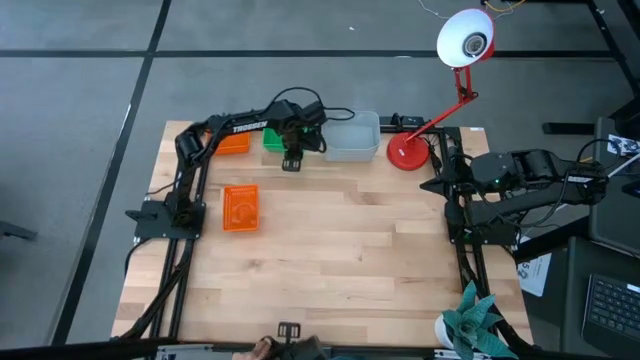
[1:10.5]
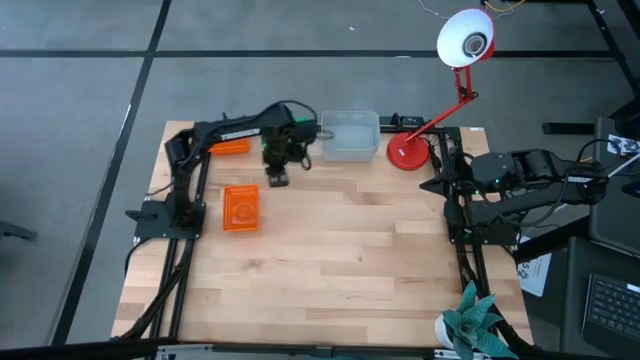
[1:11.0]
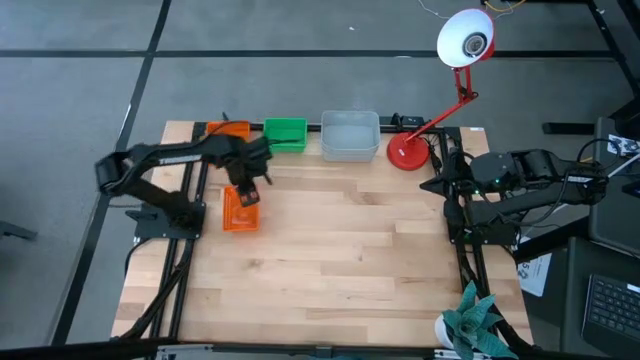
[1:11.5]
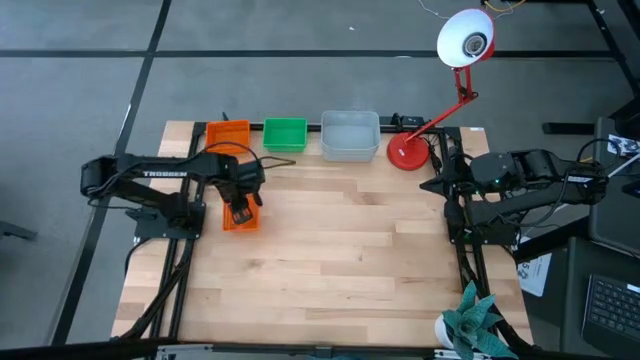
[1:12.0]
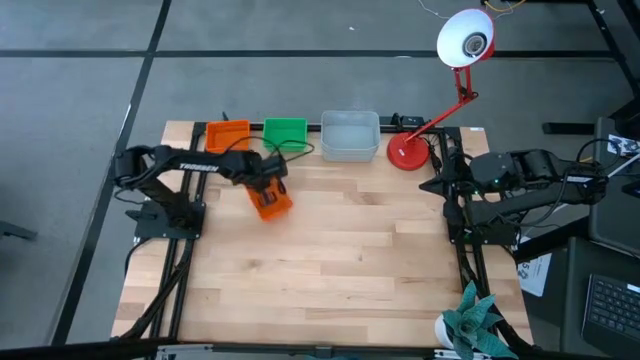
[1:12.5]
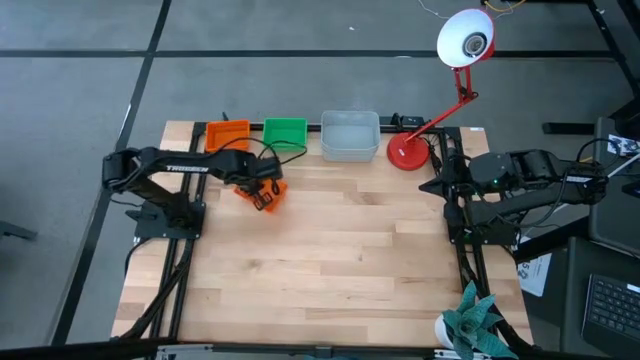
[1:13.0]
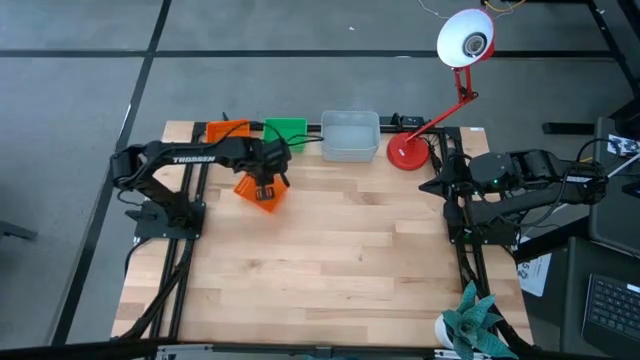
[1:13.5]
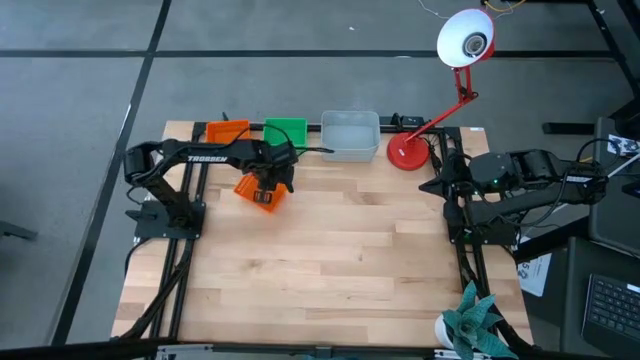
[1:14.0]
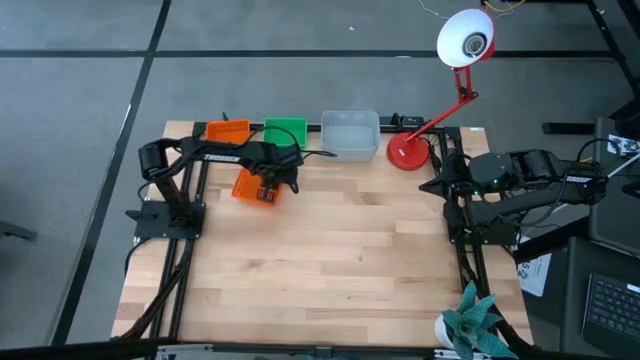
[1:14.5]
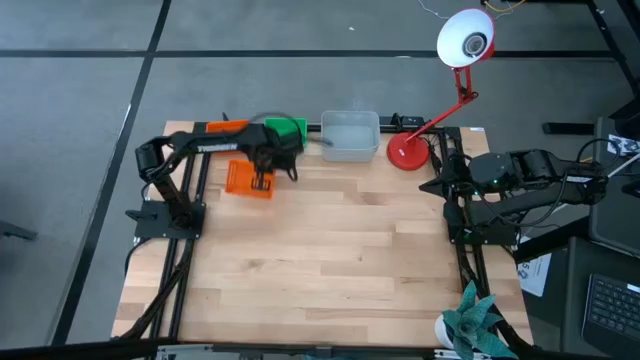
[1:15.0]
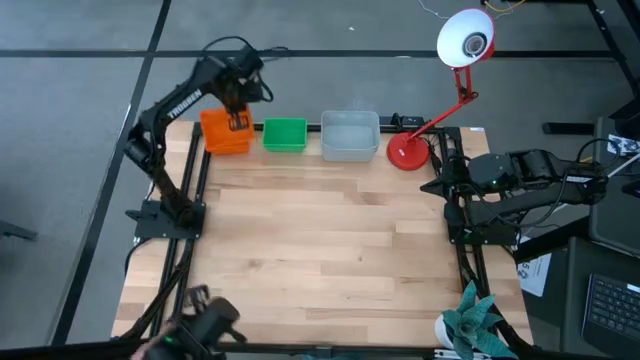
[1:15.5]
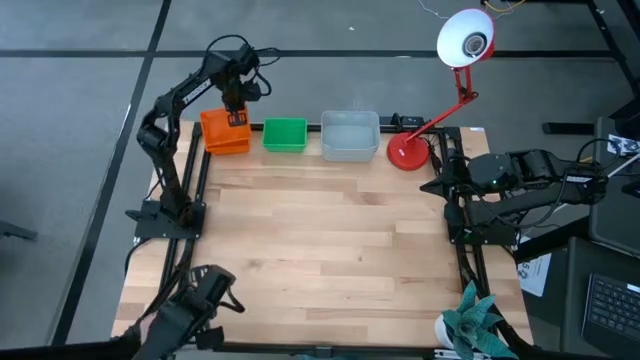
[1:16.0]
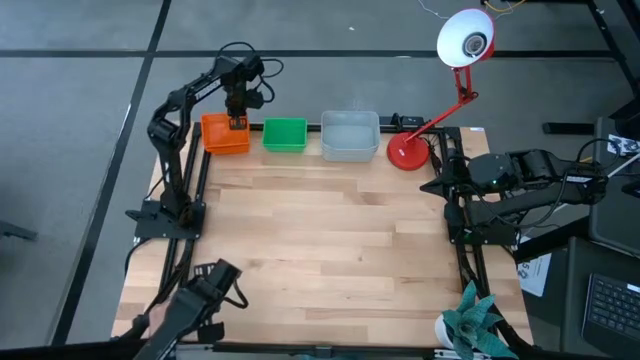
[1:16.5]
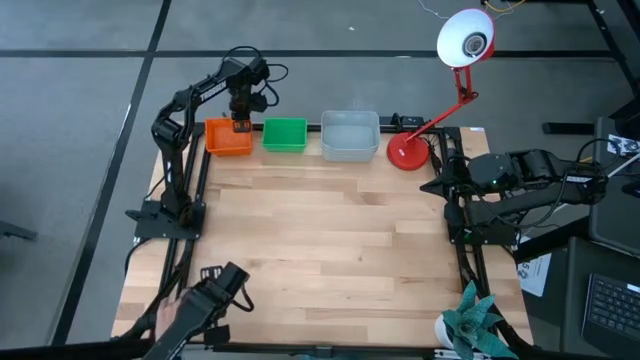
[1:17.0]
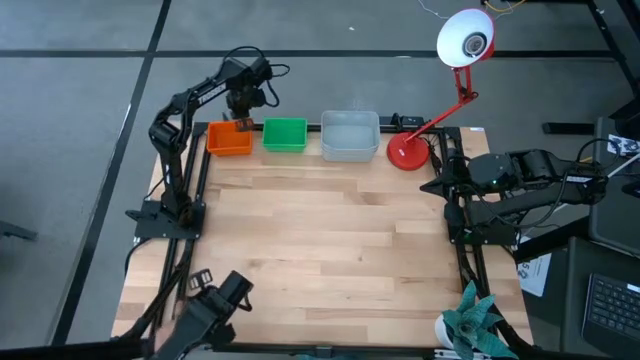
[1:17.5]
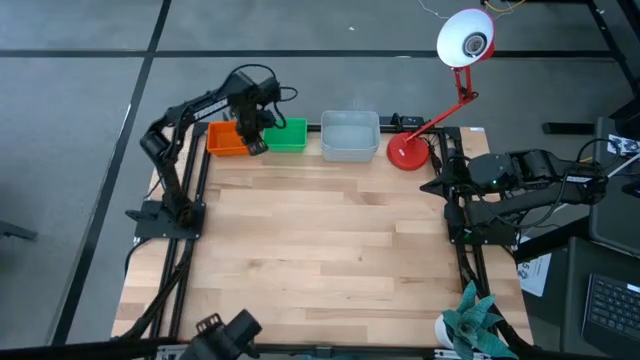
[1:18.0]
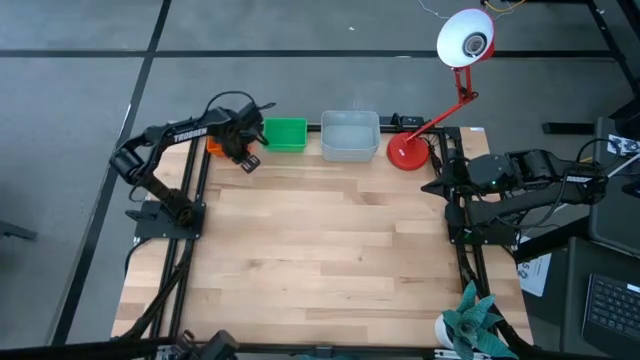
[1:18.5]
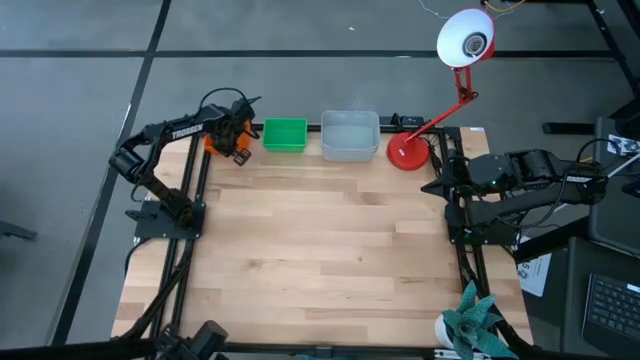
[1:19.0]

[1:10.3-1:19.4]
Stack the bottom orange bin on top of the top orange bins

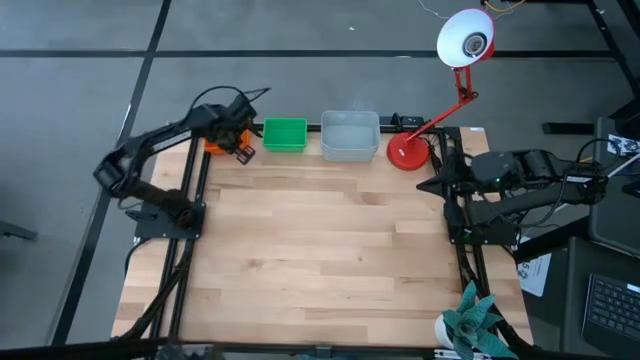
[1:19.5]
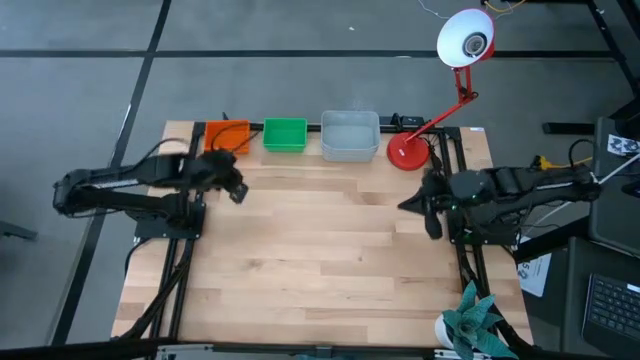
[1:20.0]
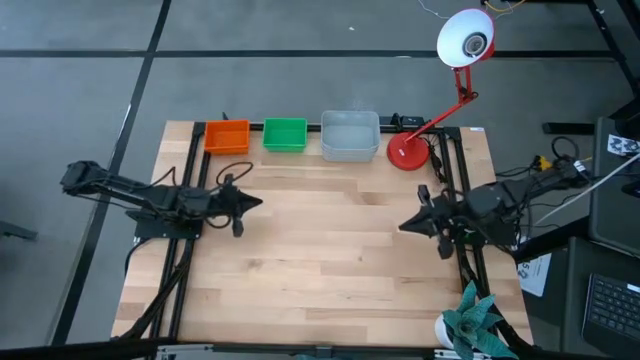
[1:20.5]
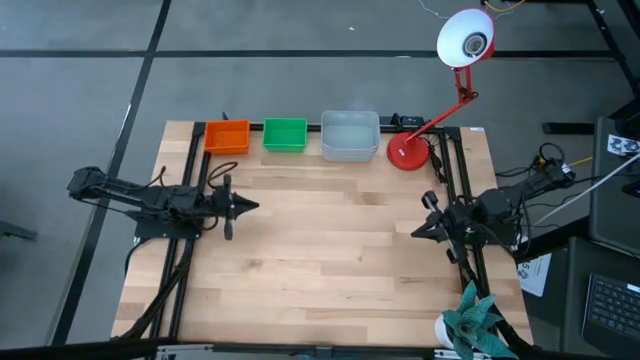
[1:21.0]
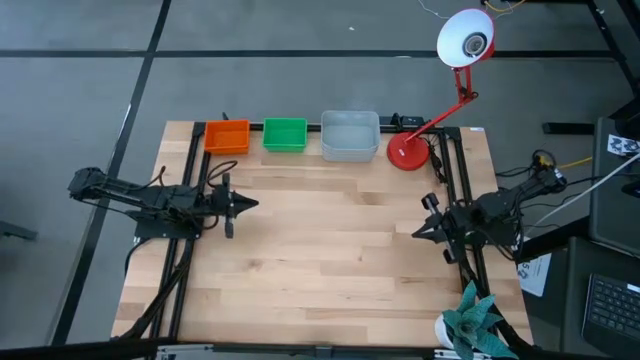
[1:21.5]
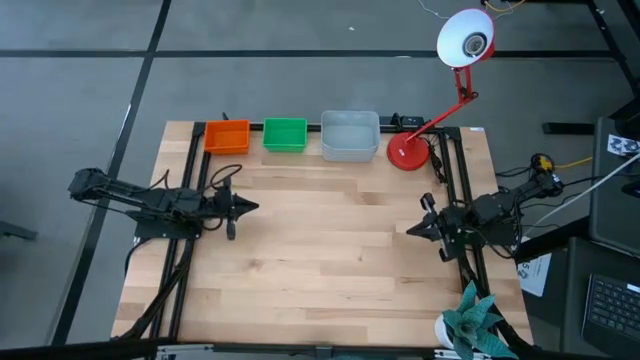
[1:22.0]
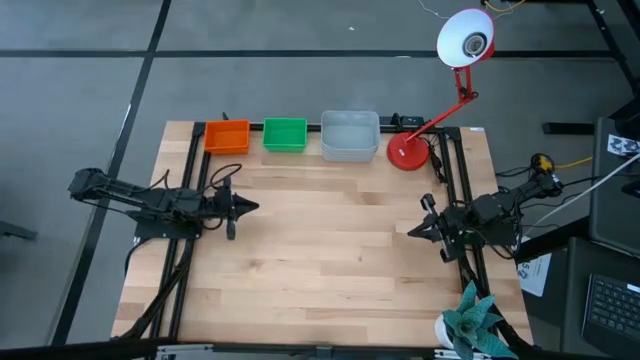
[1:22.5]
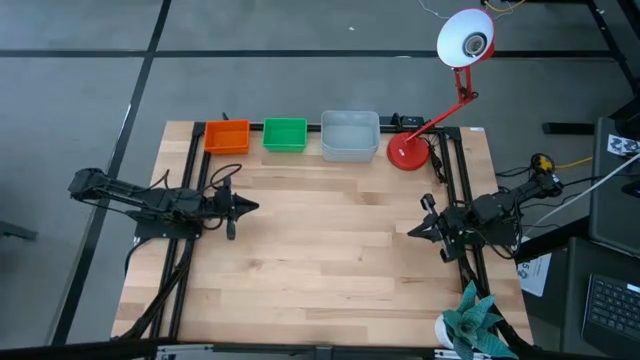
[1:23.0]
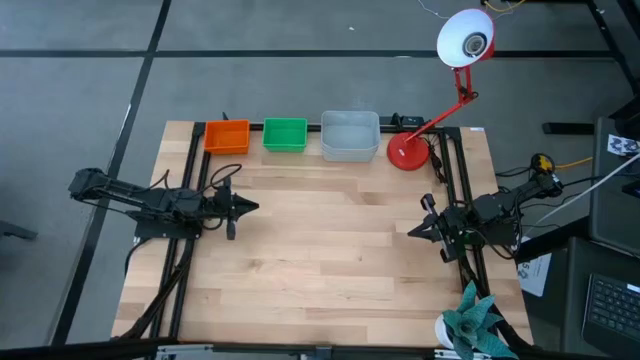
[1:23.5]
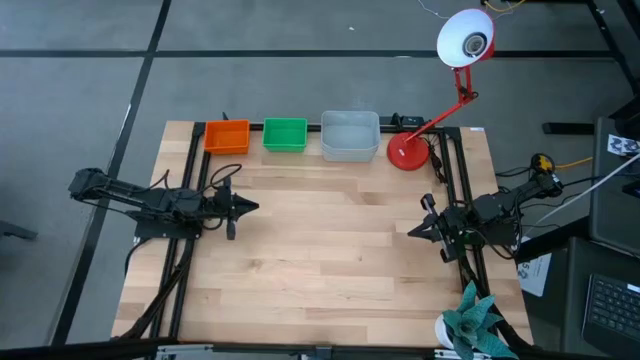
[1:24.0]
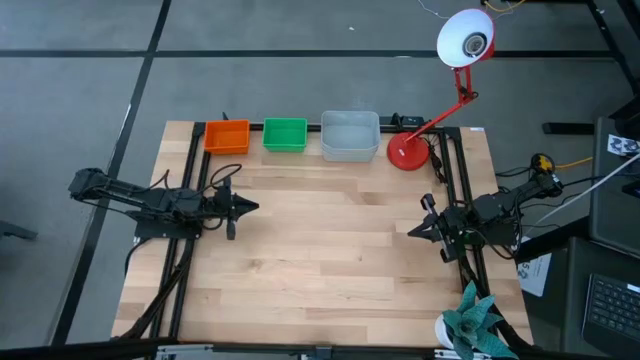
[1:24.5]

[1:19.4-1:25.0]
Return to Home Position
